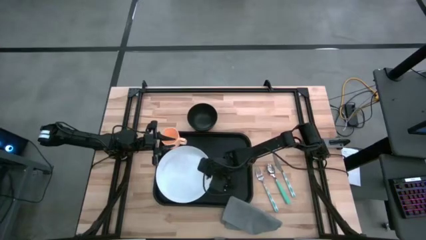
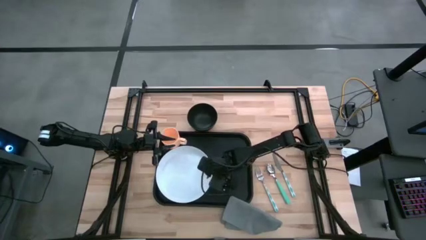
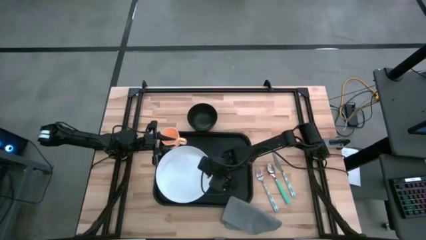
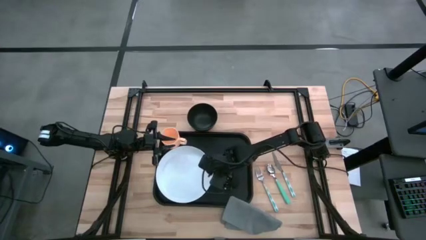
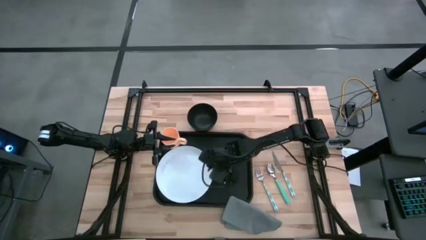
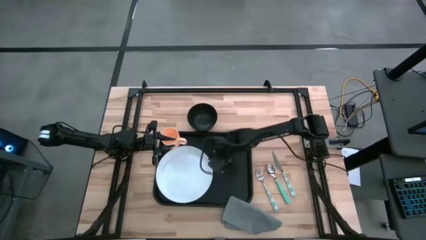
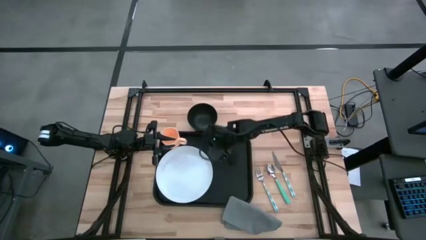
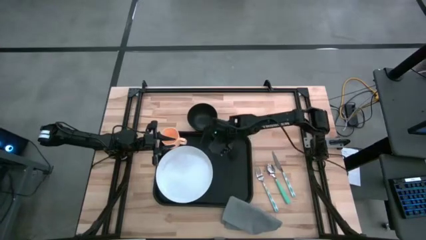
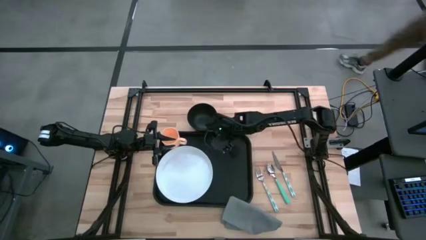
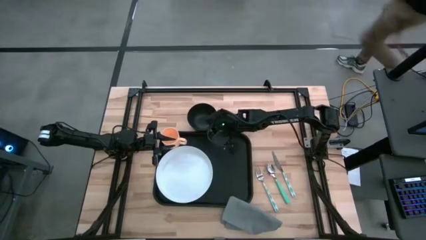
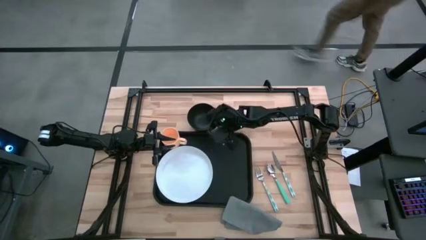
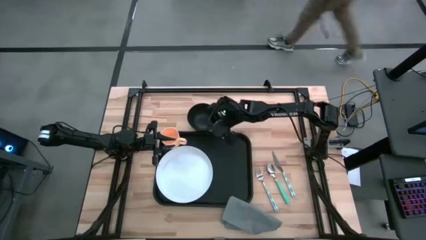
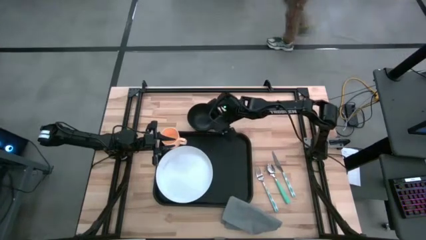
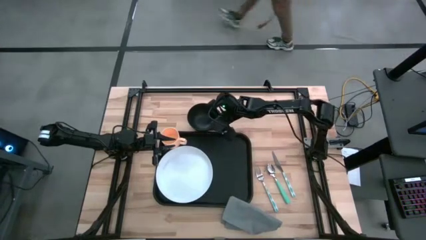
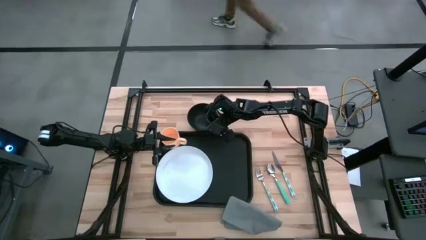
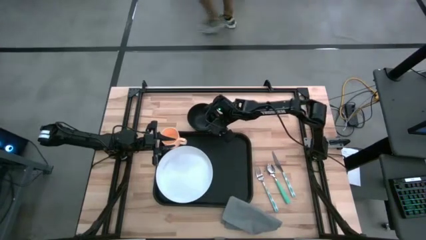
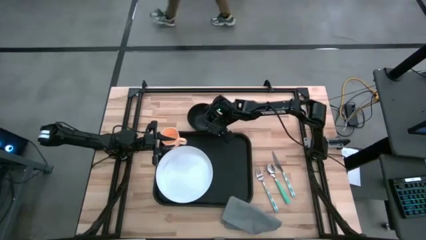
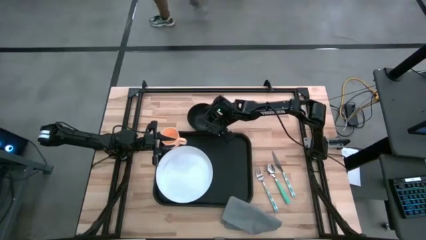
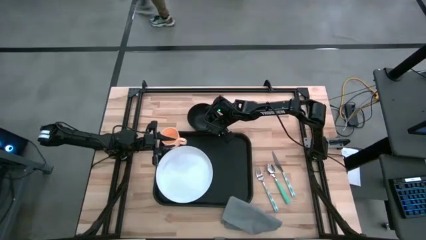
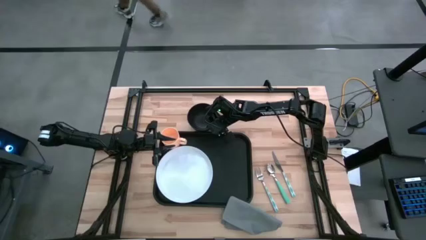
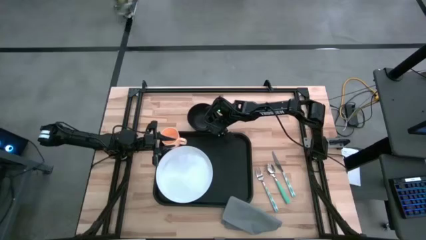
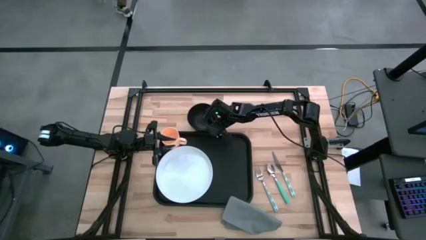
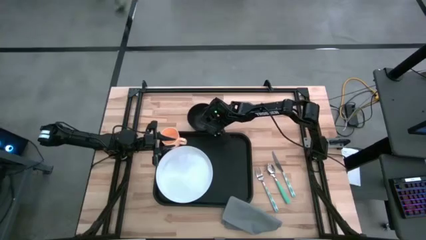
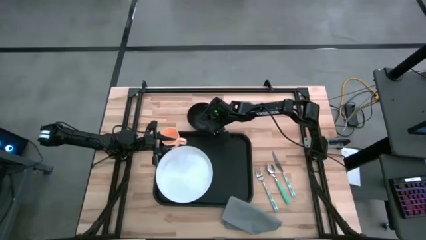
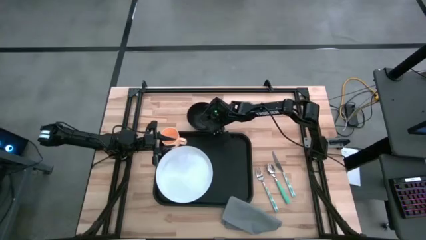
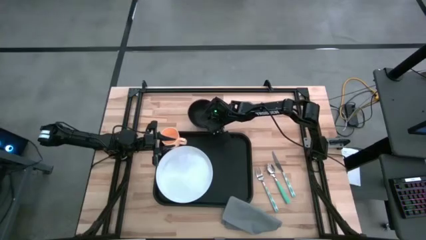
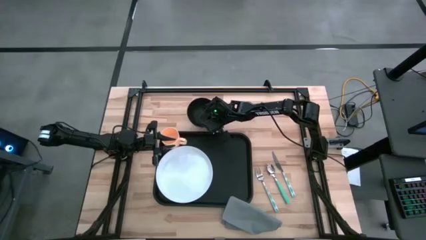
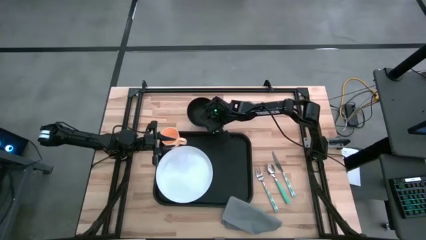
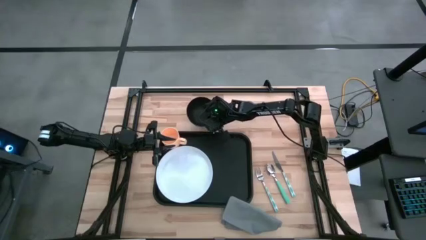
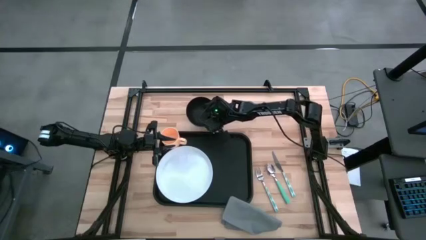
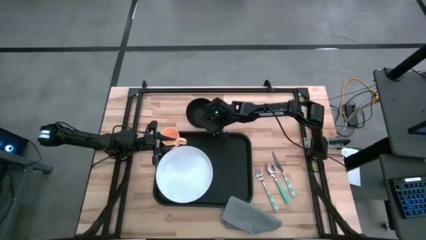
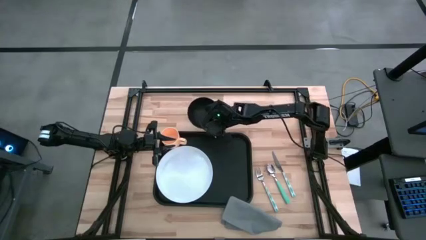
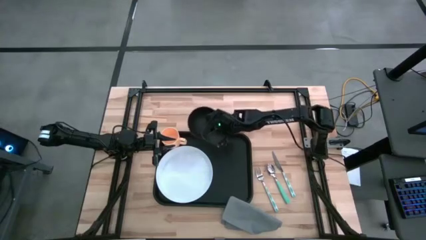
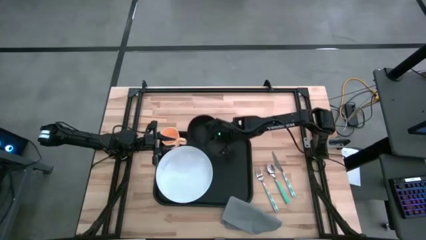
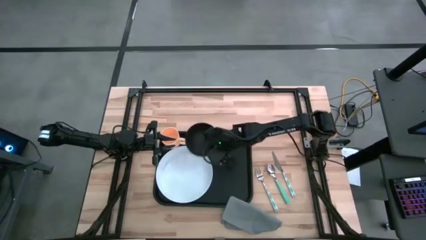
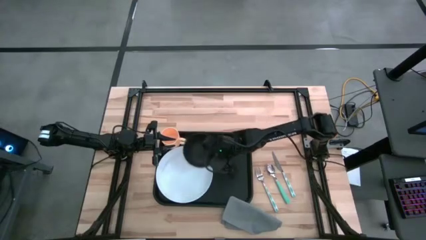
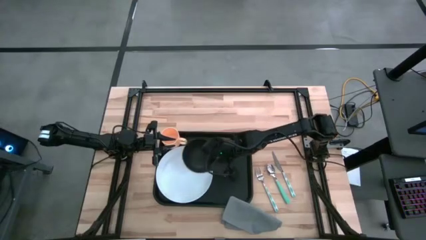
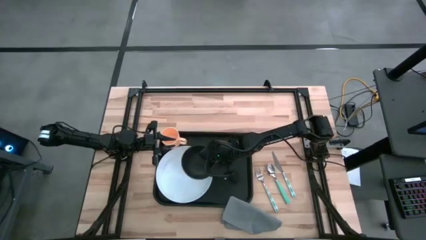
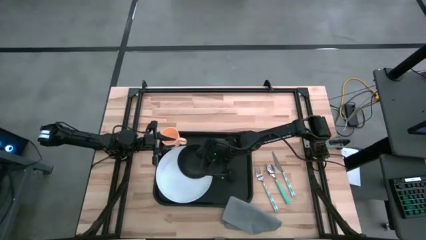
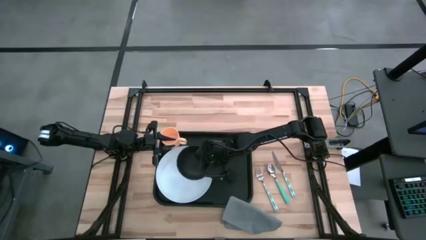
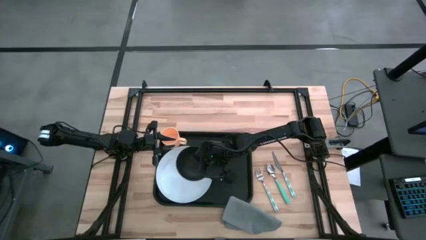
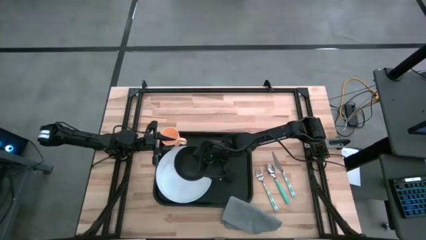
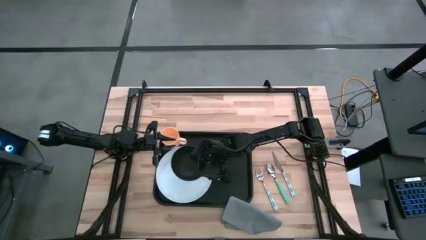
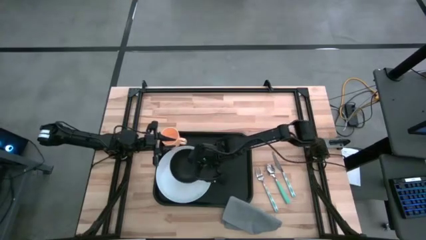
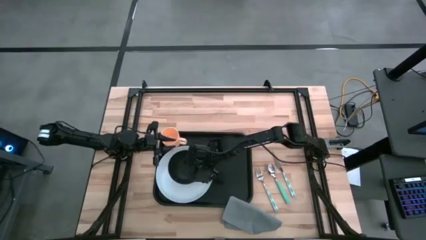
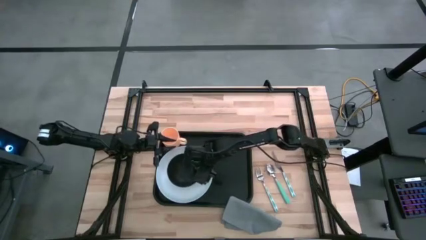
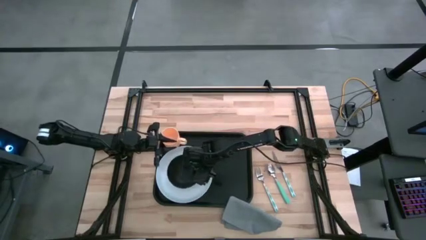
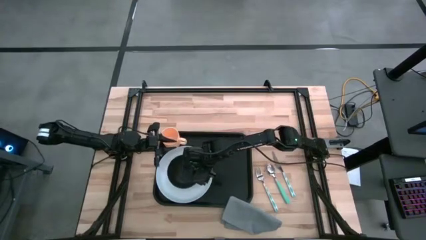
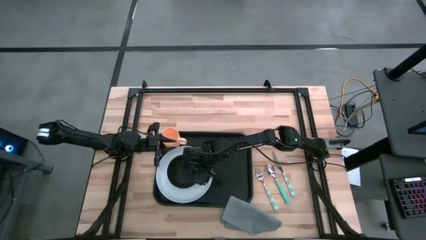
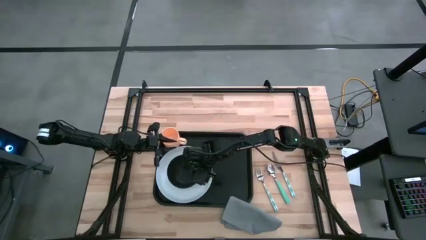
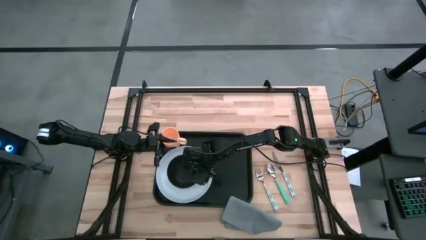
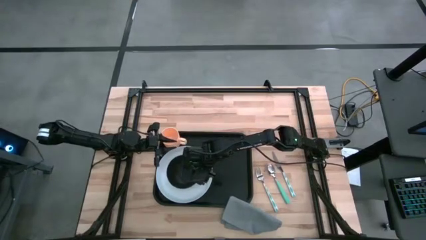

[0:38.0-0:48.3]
Task: Set up tray
Stack the bowl on top of the plate on the serving tray
